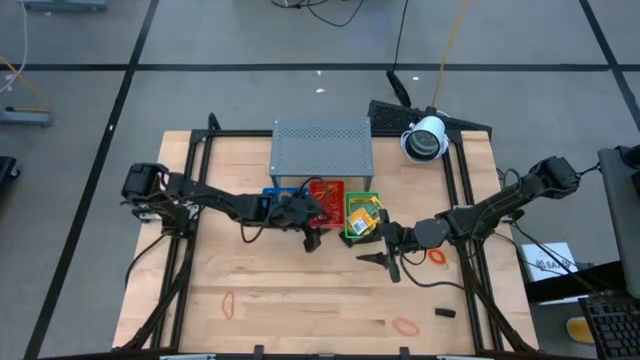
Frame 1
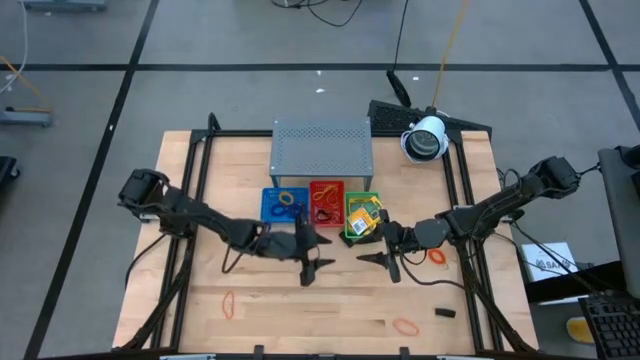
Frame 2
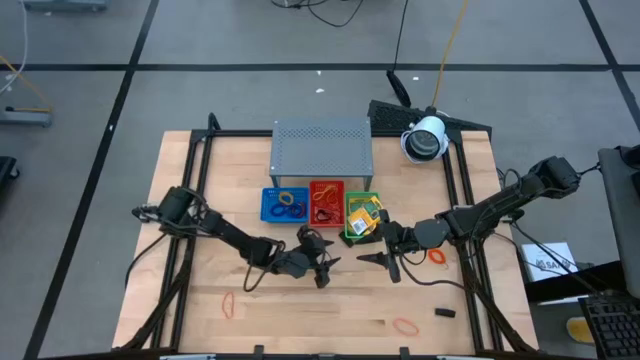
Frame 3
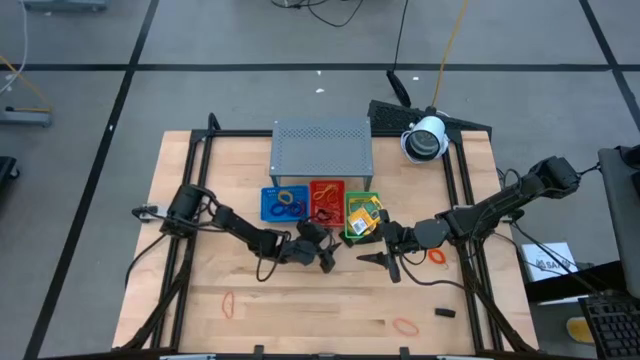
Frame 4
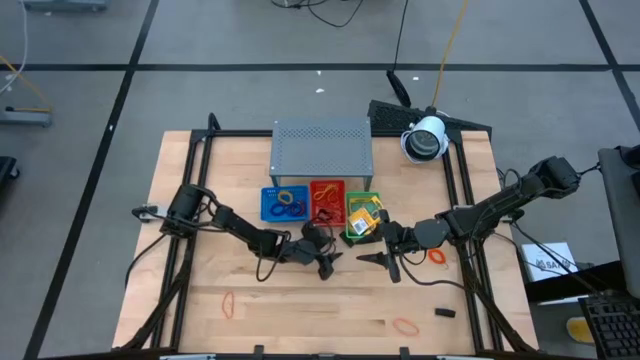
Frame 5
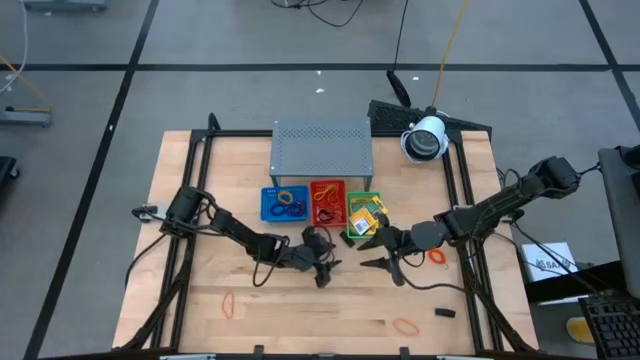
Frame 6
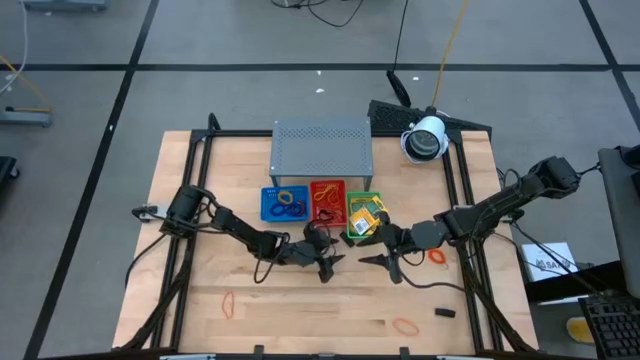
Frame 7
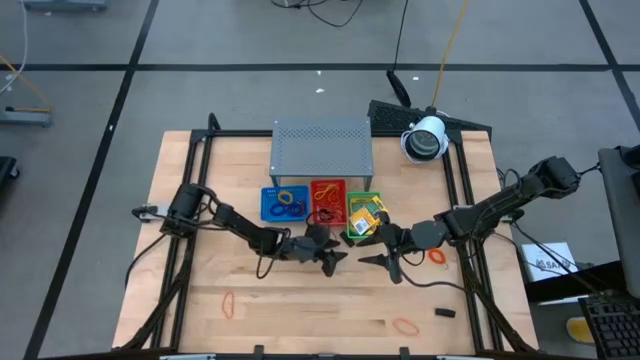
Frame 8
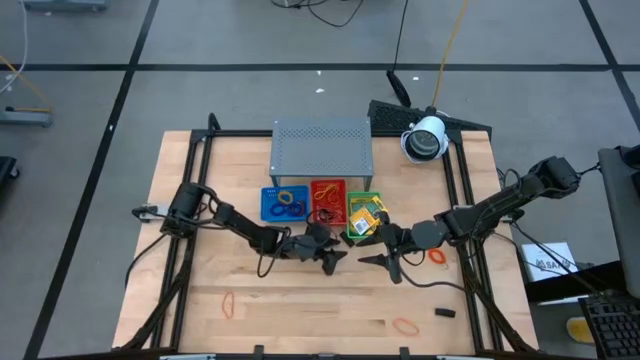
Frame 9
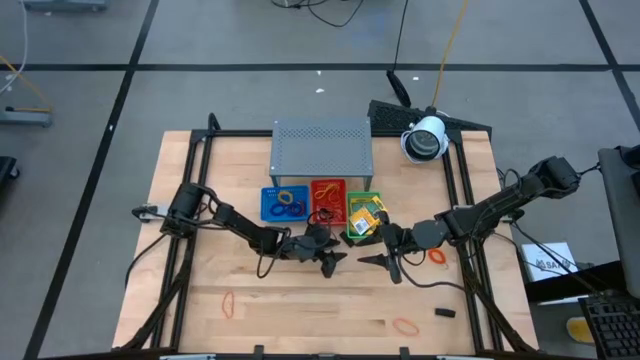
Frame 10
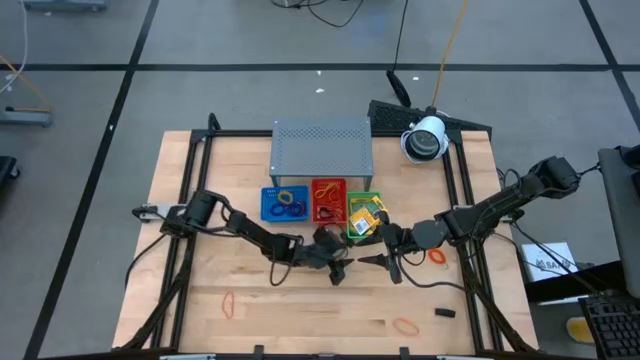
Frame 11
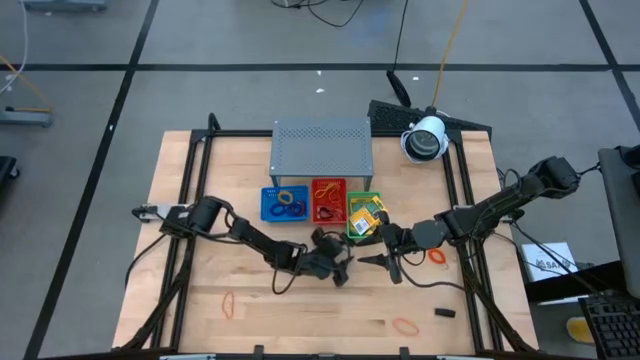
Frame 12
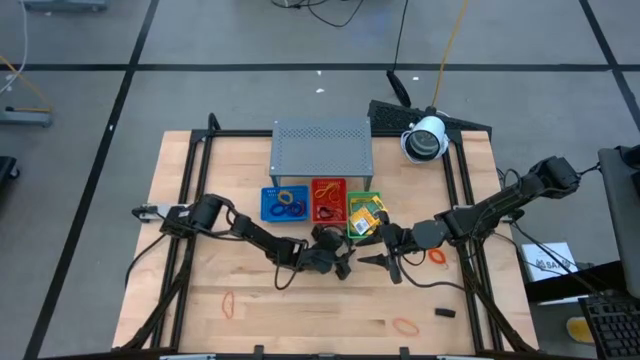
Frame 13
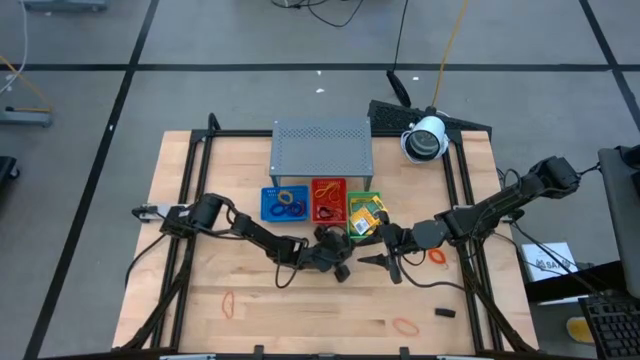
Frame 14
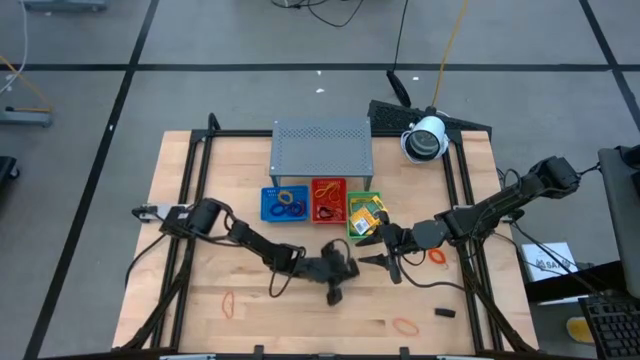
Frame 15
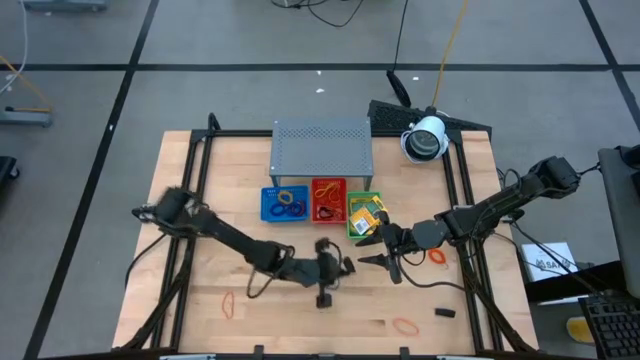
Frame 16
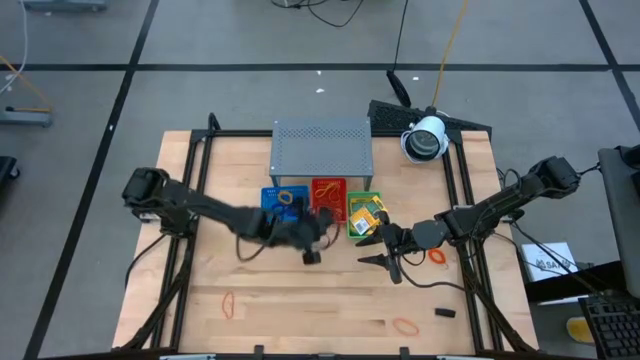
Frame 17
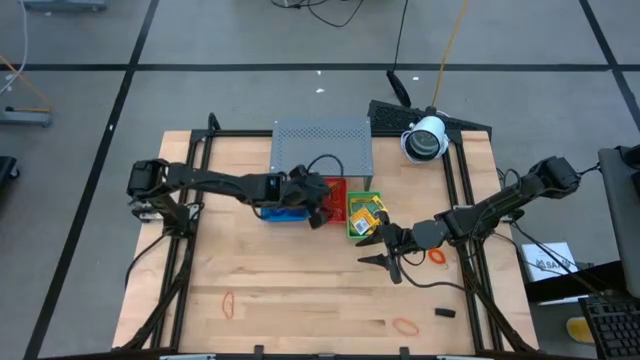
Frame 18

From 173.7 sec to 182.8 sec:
Task: Pick & Place Office Desk Supplies
Put the black rubber band into the red bin

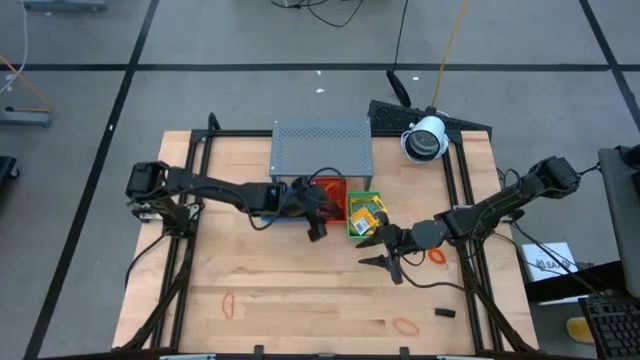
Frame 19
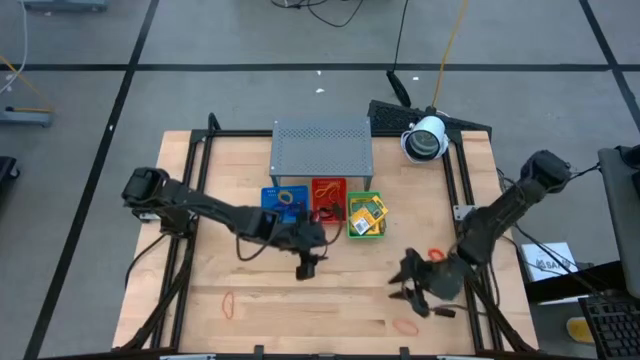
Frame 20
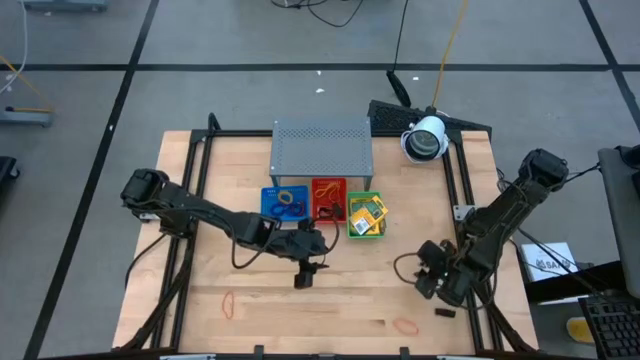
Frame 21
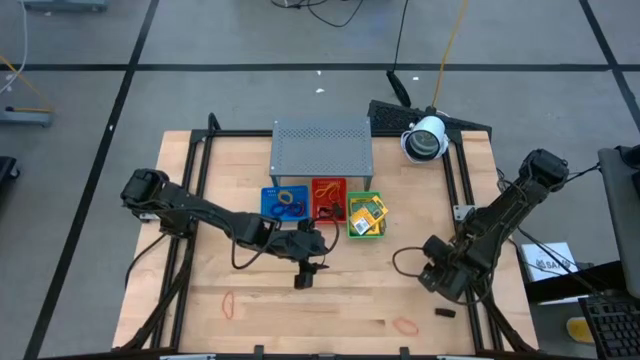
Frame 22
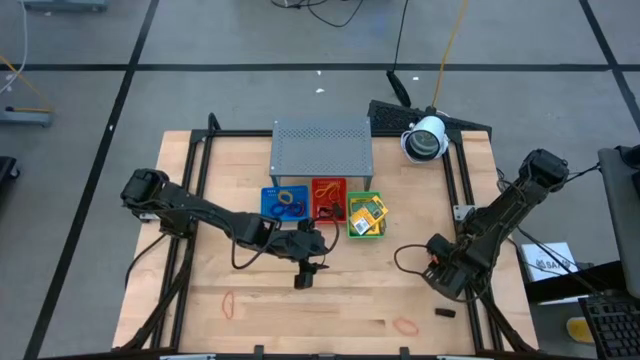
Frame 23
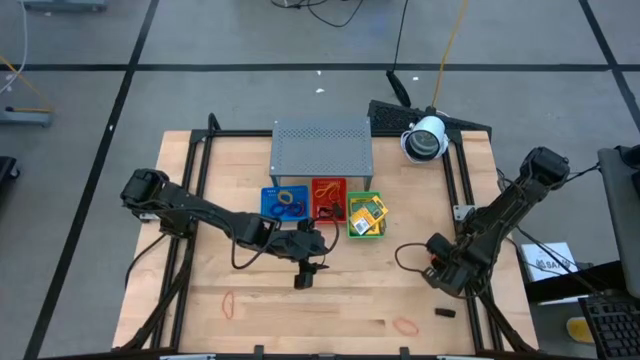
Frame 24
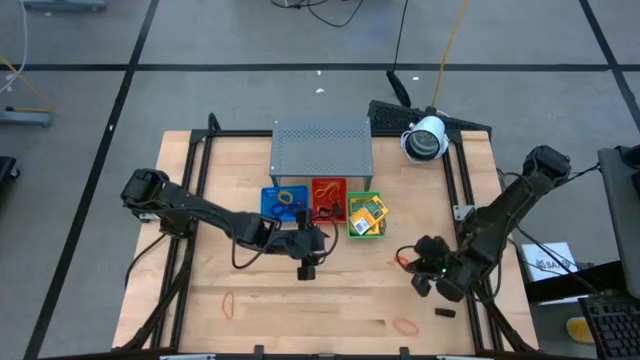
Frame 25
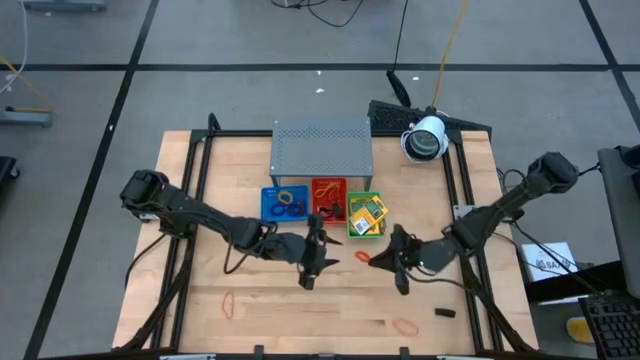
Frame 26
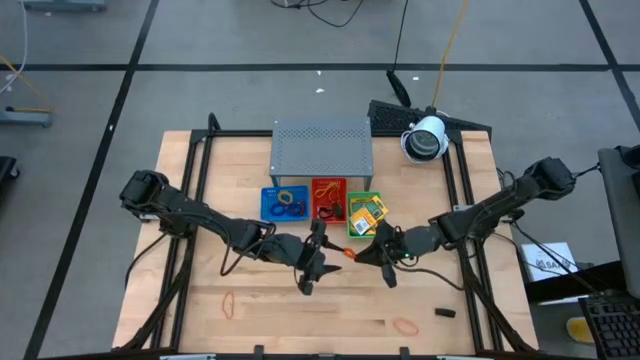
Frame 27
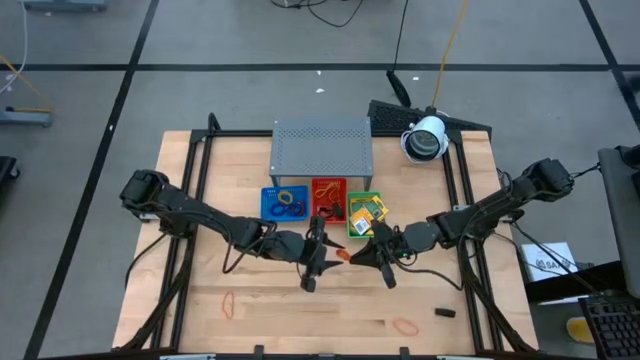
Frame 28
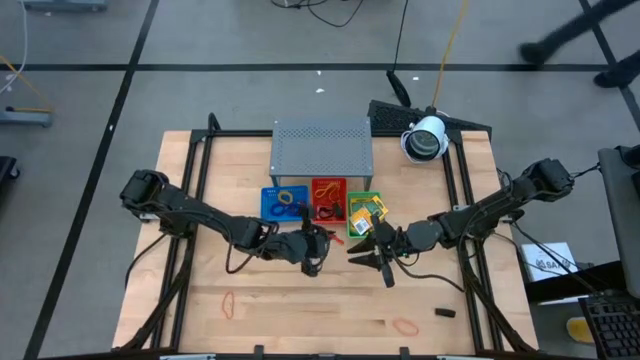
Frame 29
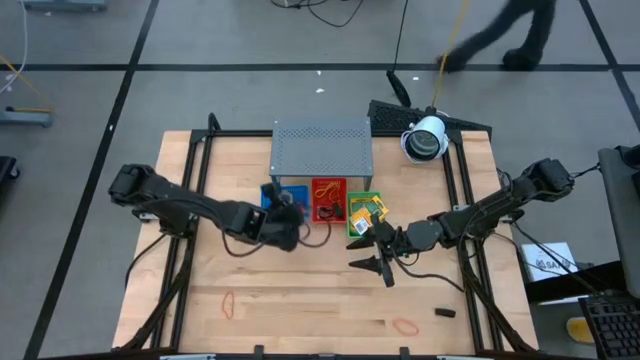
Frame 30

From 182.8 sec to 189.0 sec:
Put the orange spring keychain into the blue bin

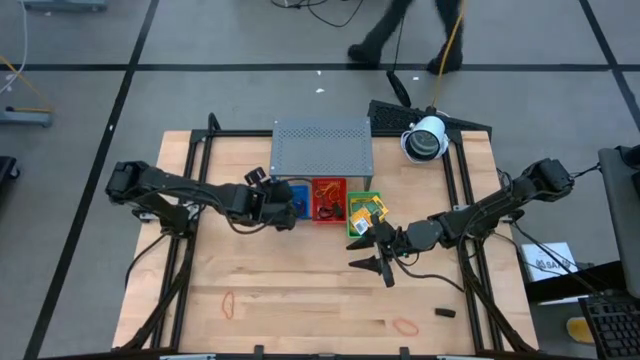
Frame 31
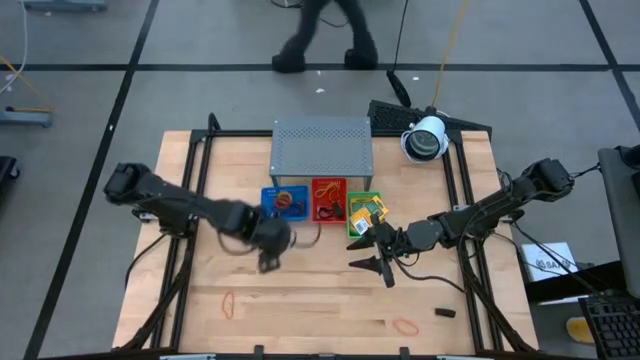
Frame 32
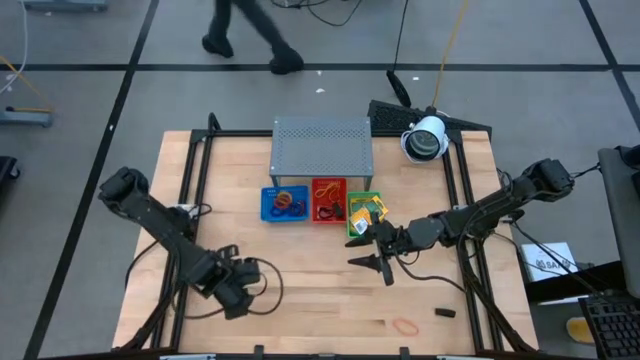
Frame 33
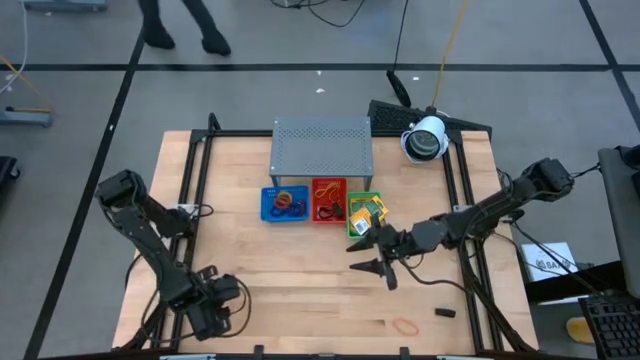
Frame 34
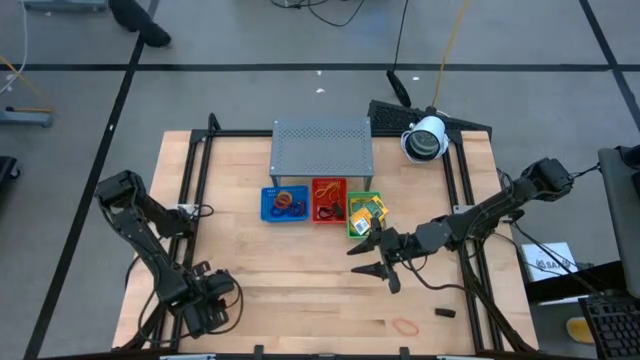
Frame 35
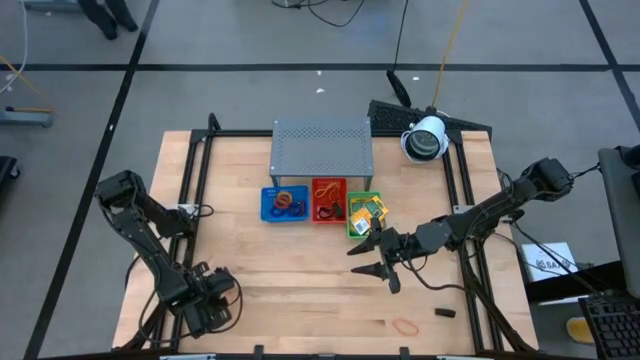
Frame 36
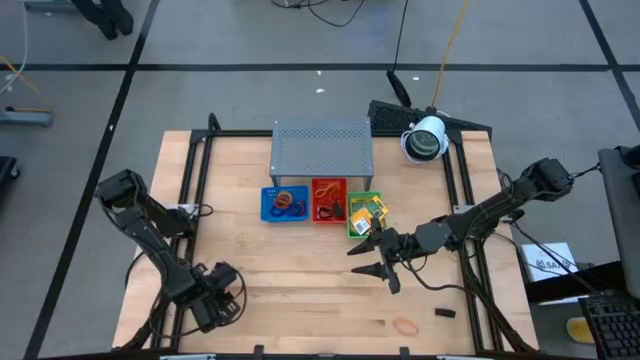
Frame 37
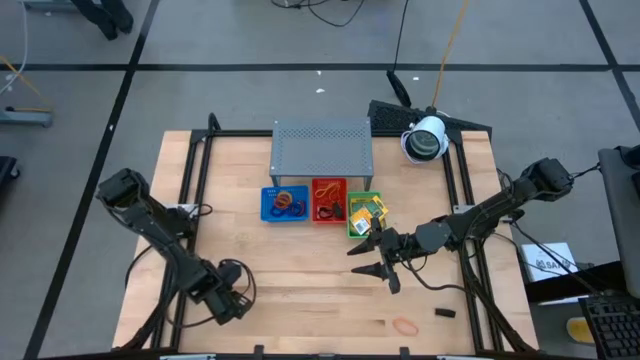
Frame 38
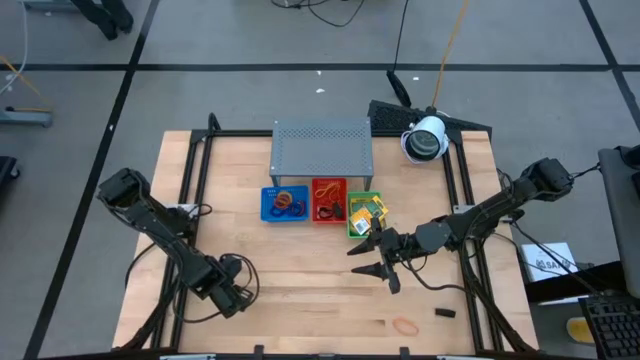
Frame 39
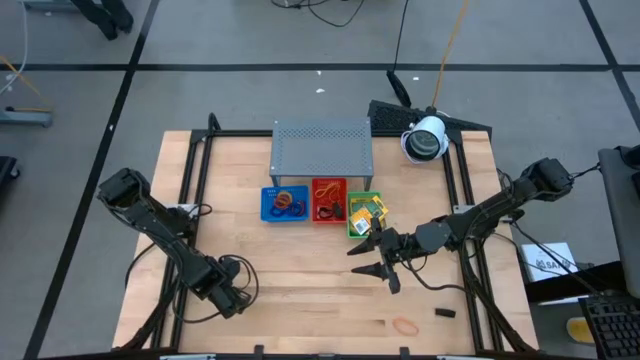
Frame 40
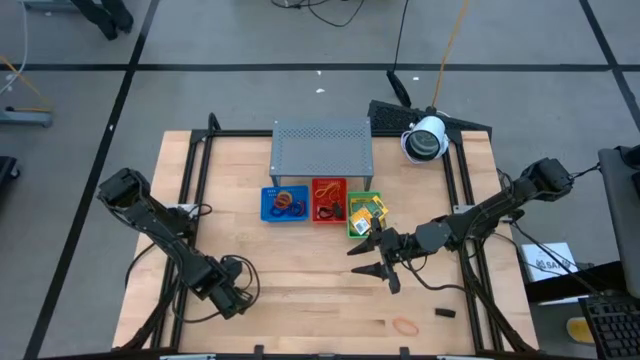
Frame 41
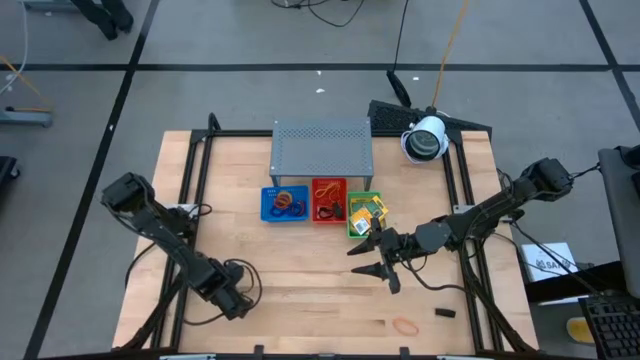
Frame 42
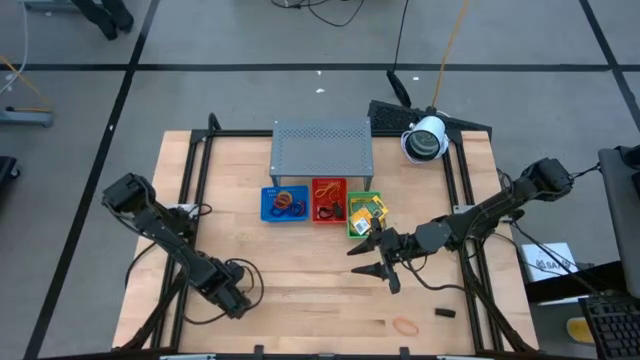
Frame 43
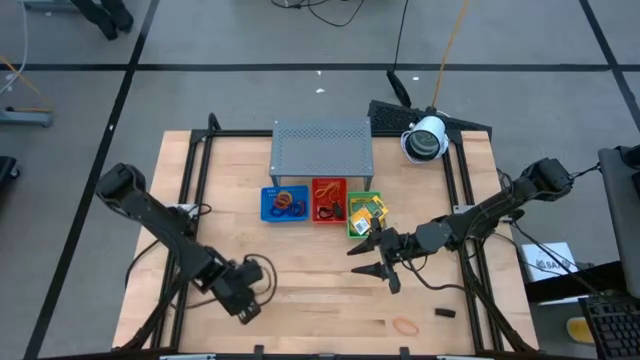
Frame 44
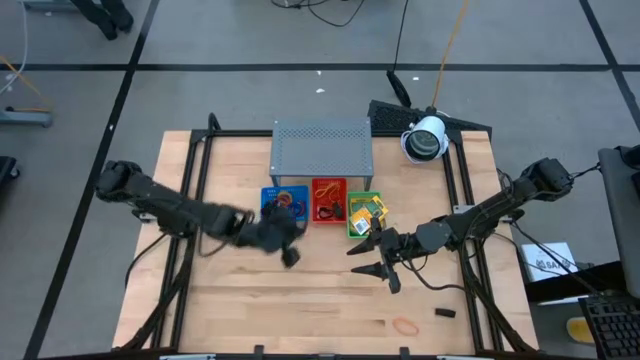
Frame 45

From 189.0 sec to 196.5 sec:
Put the orange rubber band into the red bin
